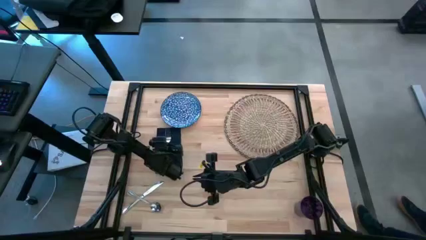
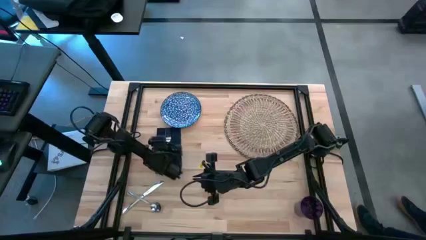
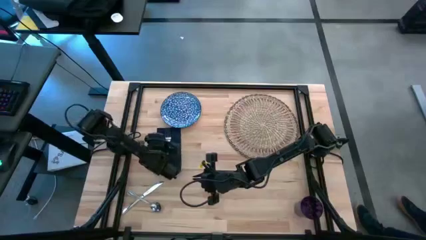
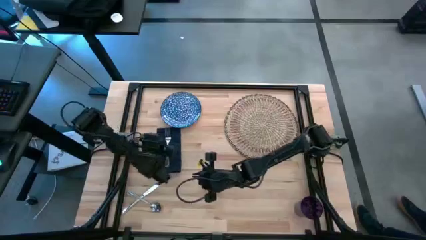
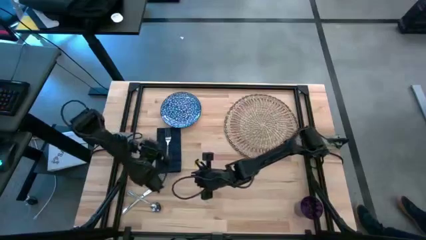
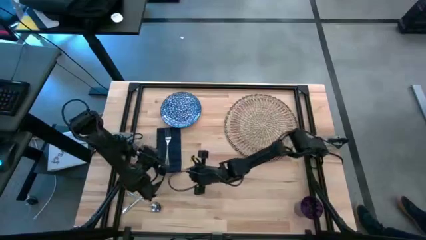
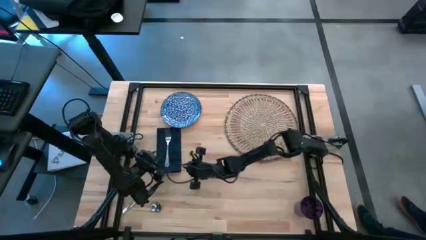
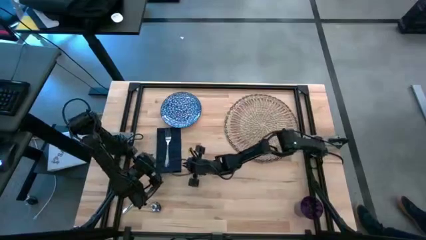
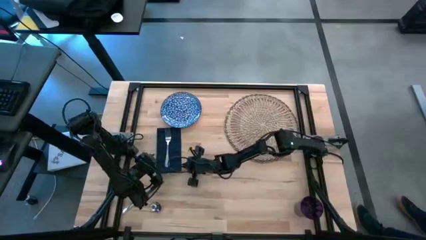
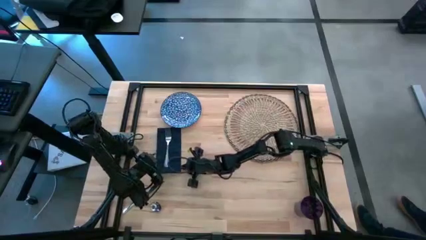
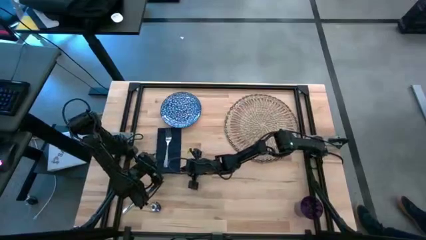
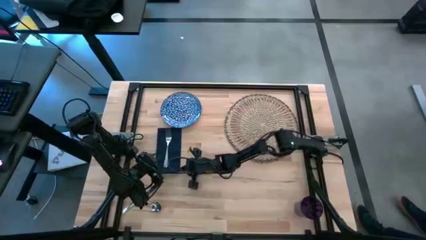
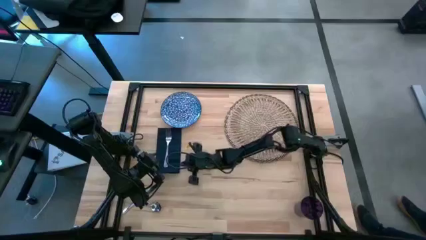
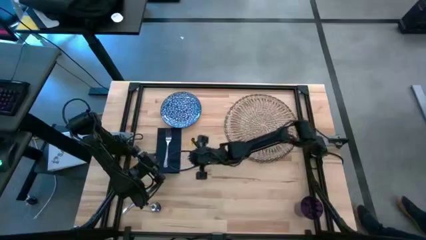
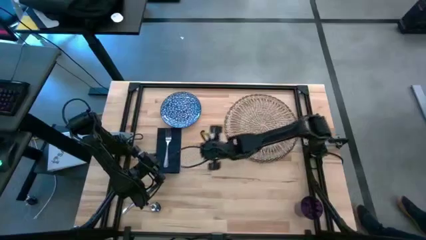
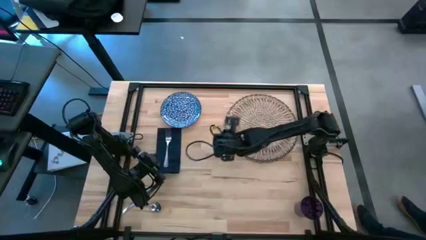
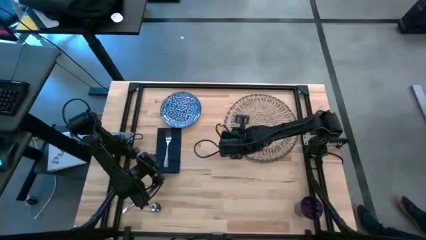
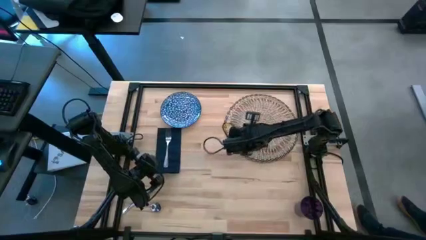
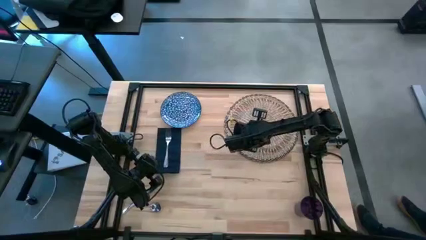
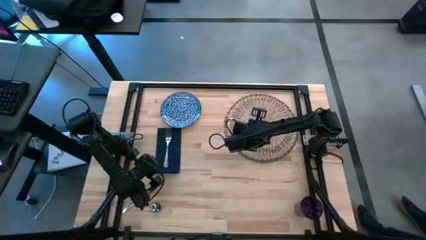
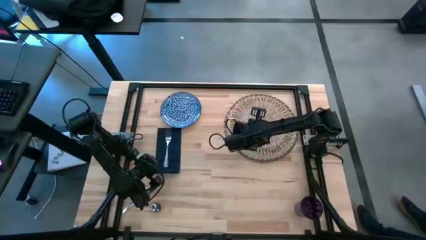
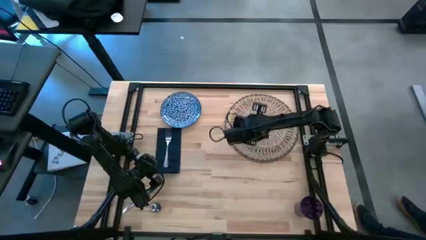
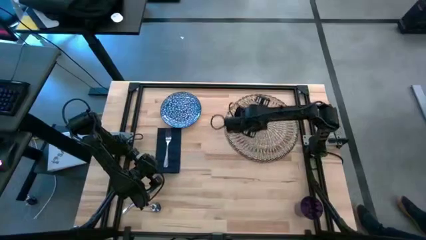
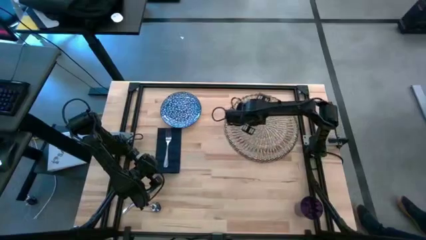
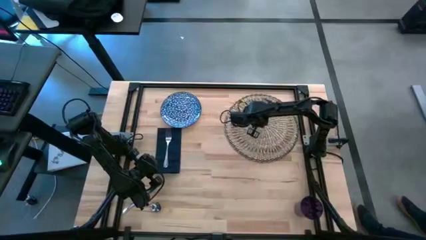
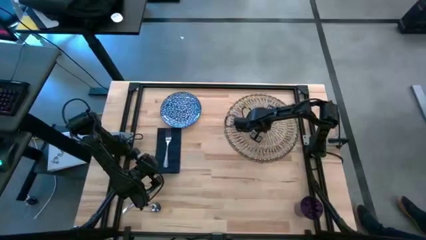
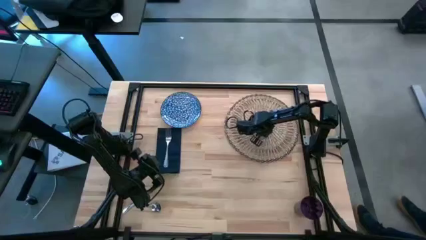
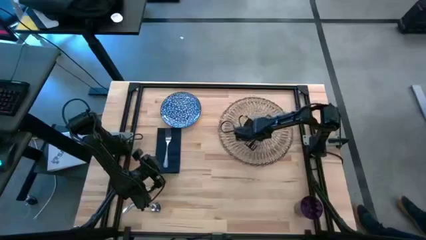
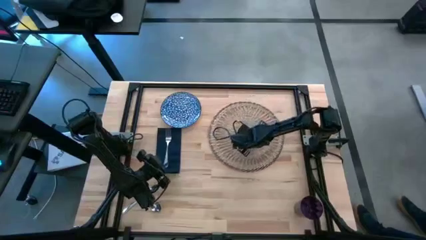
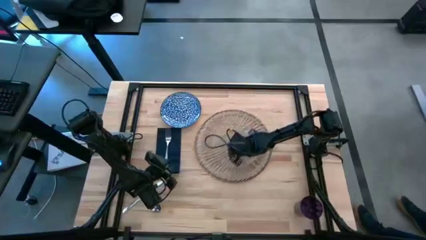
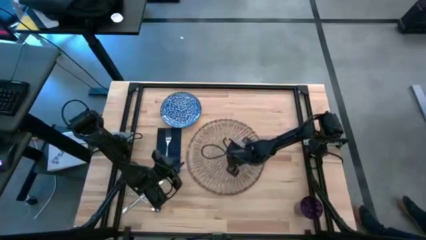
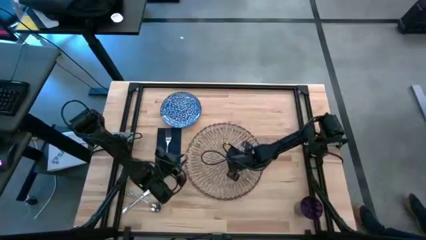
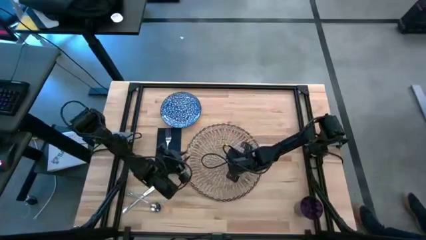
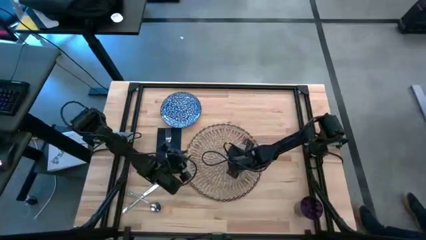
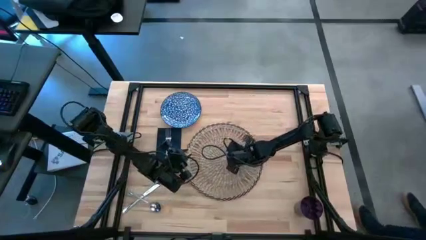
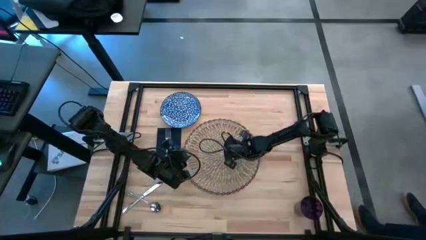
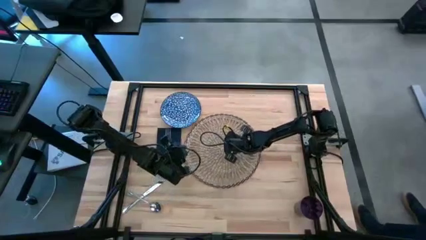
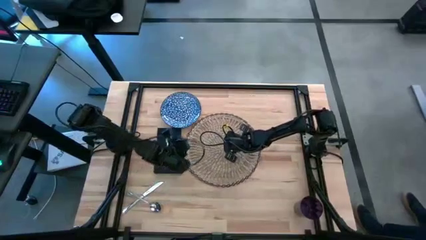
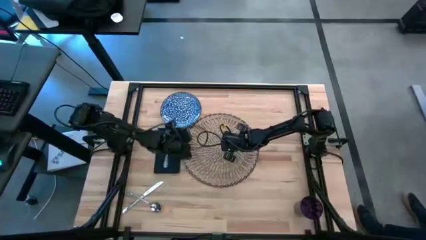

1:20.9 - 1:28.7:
Task: Set table place
Move the brown placemat to the center of the table

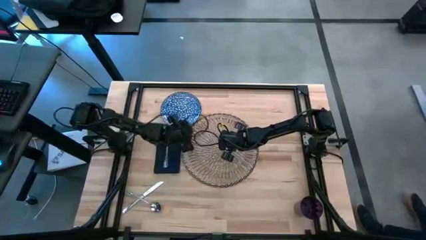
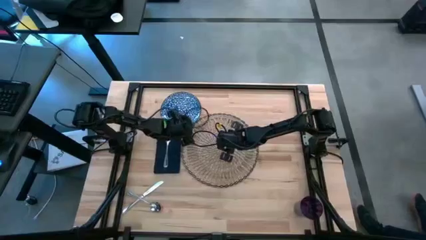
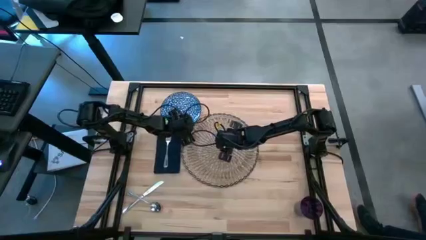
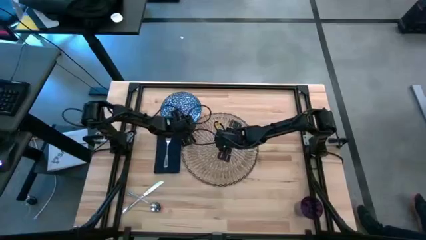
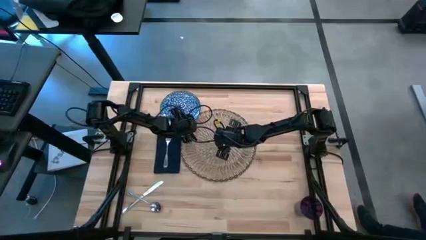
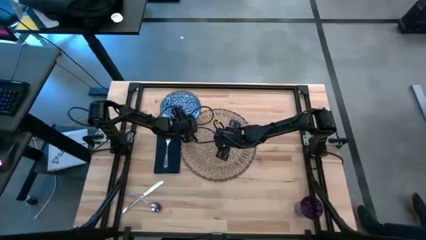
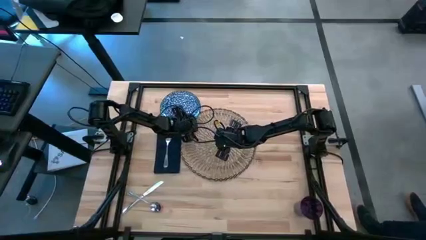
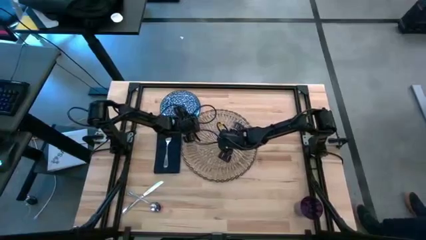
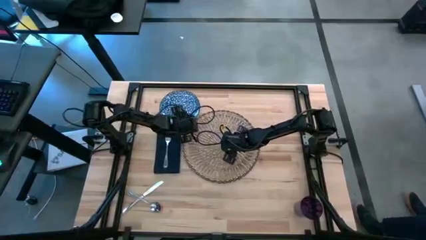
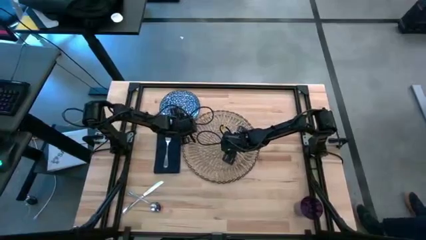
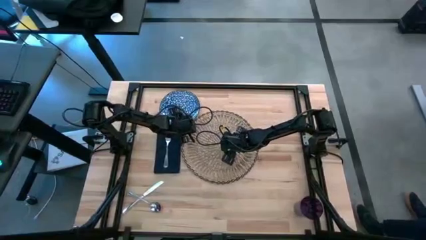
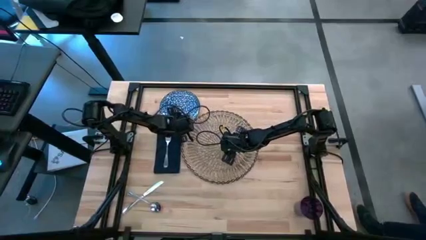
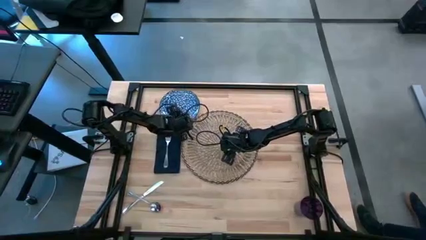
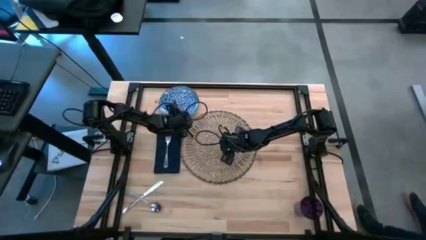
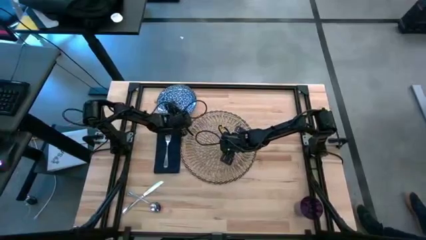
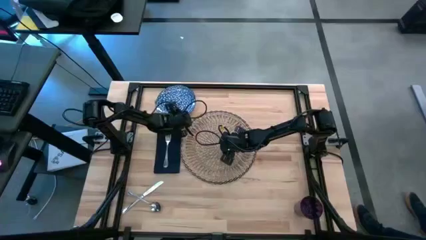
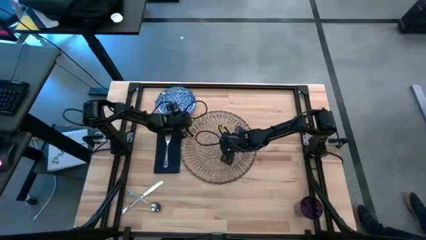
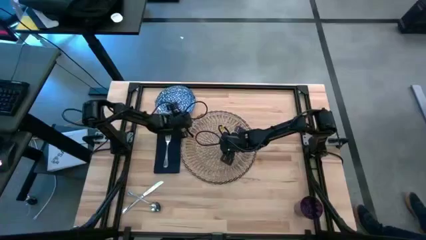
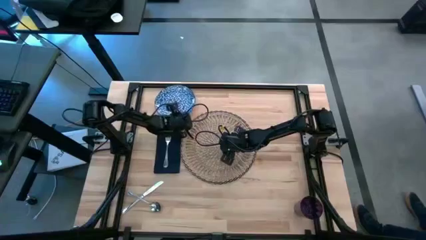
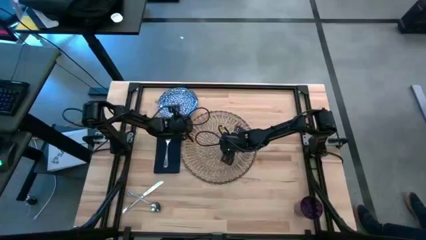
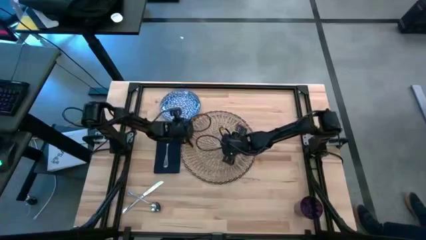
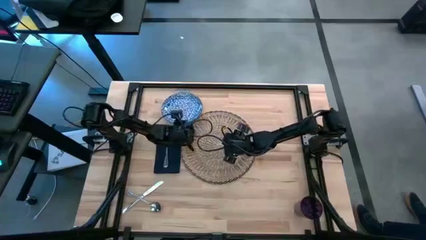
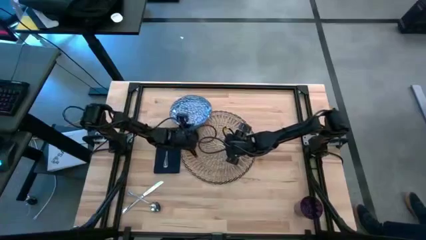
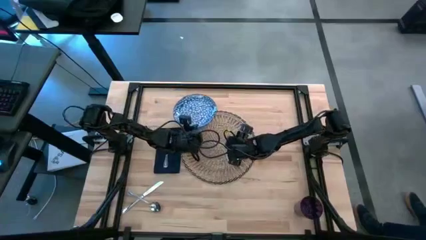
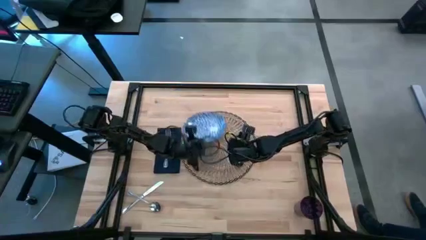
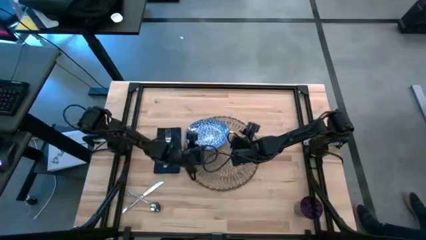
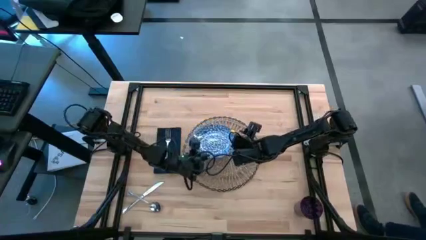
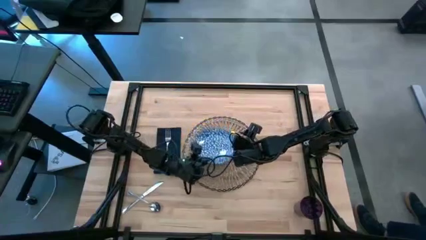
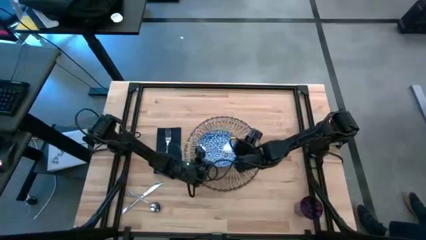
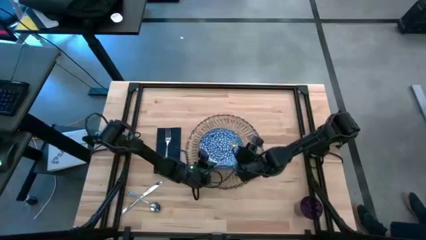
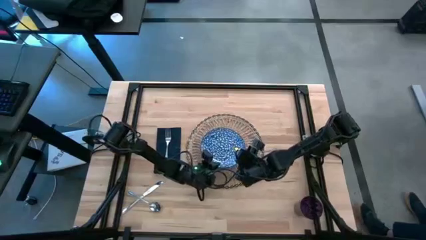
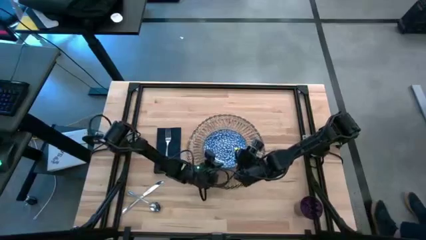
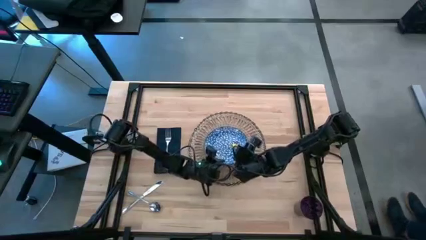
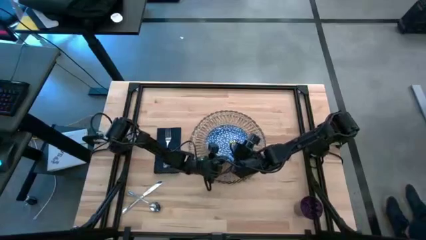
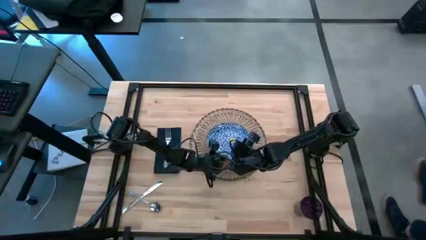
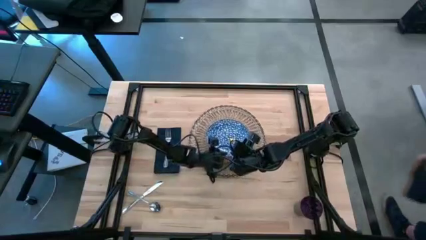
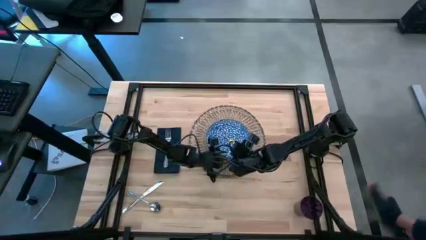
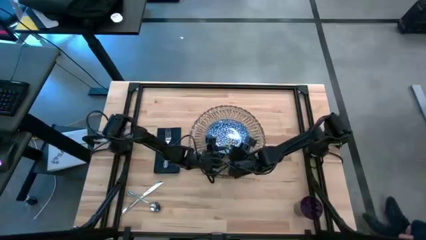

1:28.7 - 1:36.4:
Put the blue plate on the brown placemat

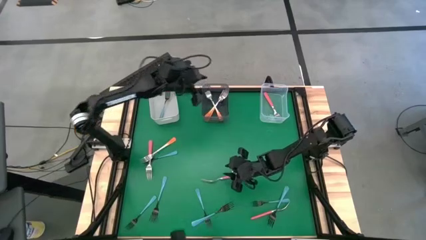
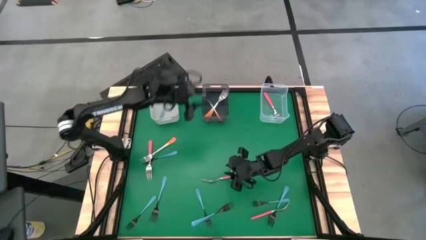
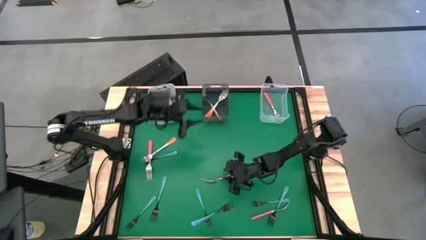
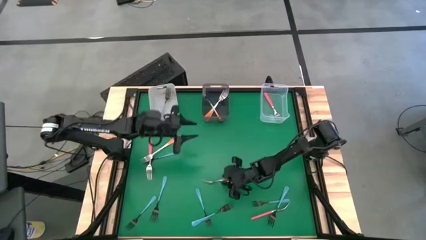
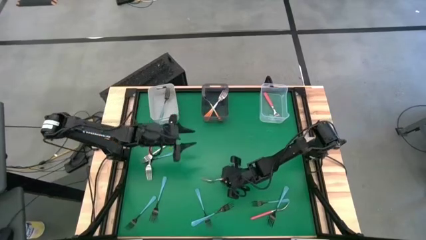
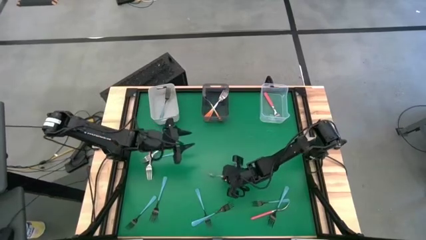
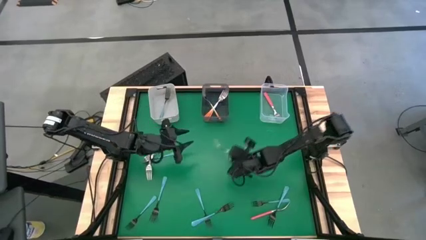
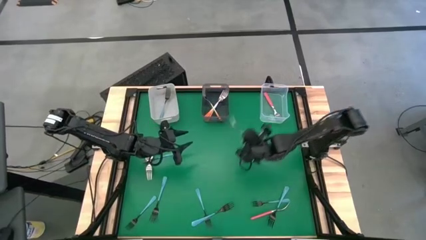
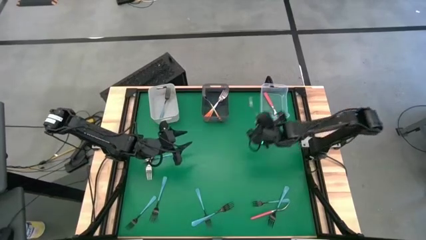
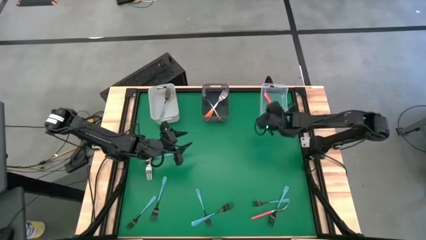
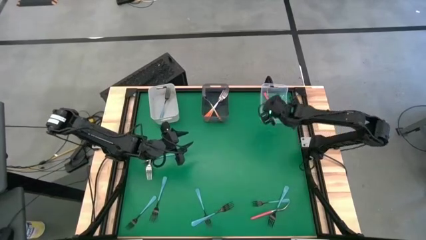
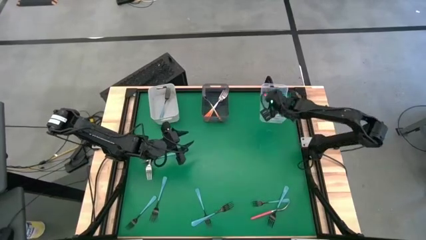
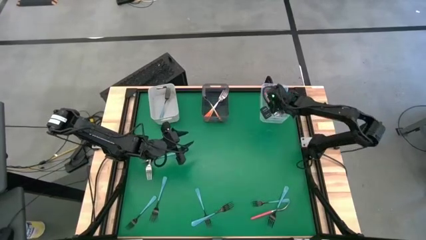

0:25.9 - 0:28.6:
Task: Sort silverware by color (type)
Put the pink fork into the transparent bin
